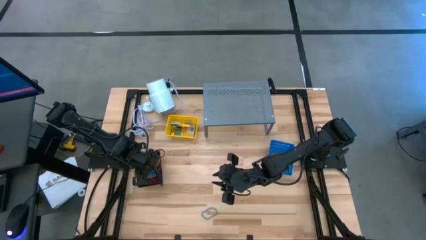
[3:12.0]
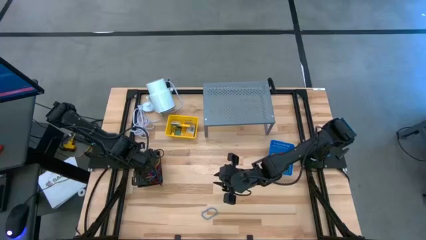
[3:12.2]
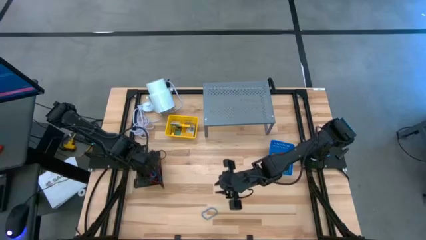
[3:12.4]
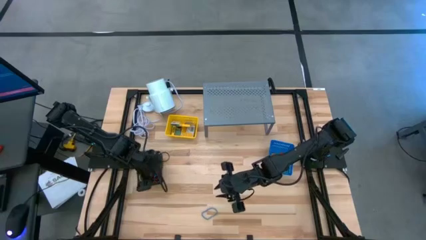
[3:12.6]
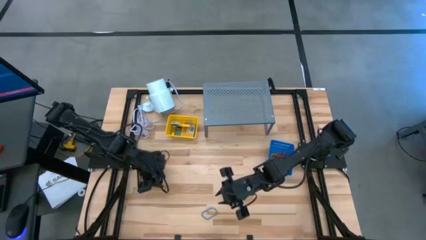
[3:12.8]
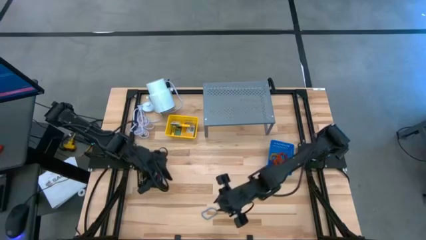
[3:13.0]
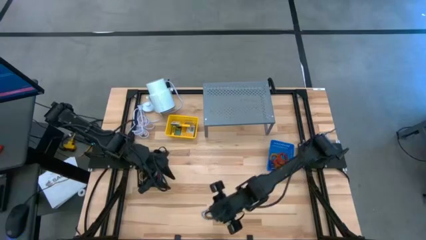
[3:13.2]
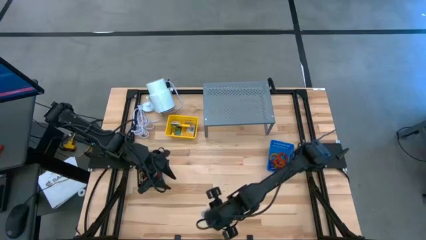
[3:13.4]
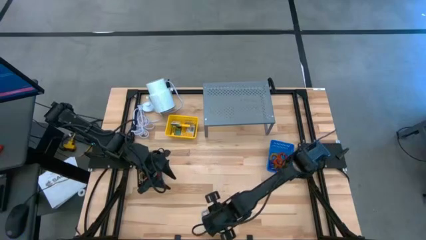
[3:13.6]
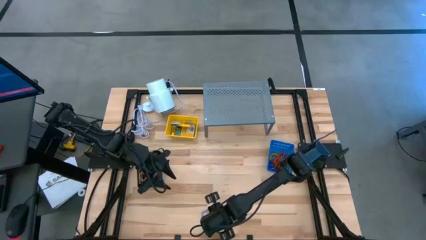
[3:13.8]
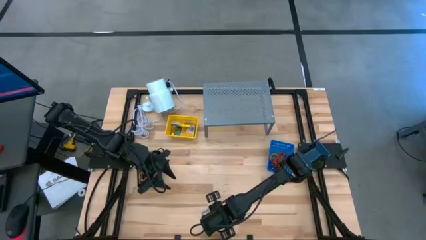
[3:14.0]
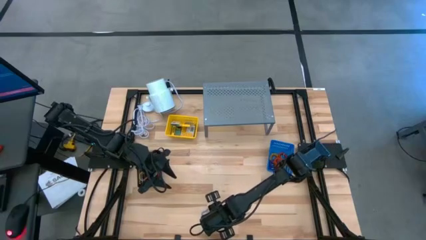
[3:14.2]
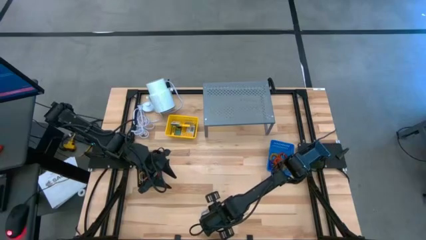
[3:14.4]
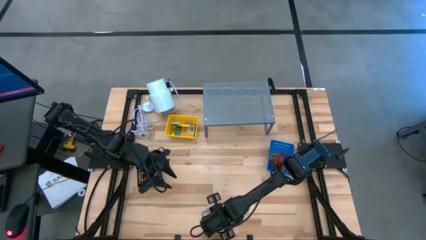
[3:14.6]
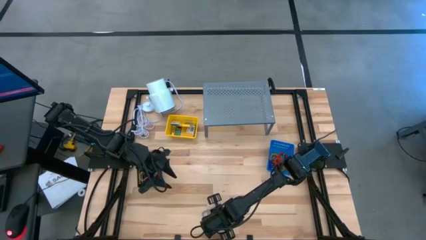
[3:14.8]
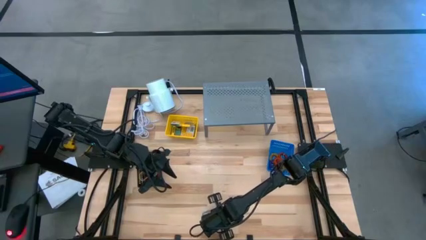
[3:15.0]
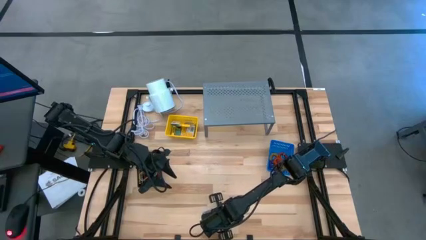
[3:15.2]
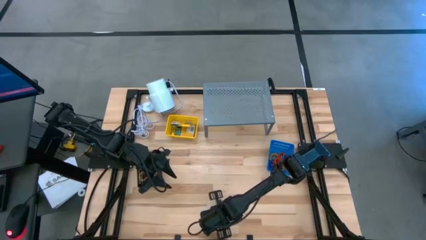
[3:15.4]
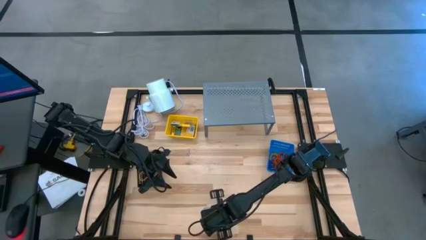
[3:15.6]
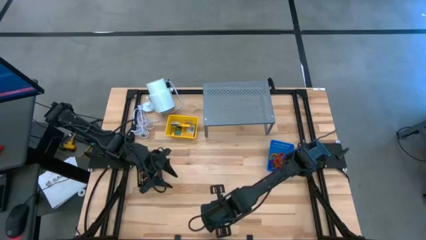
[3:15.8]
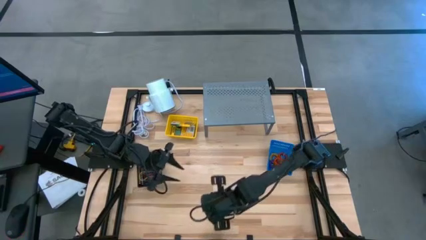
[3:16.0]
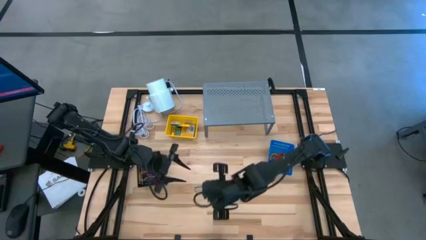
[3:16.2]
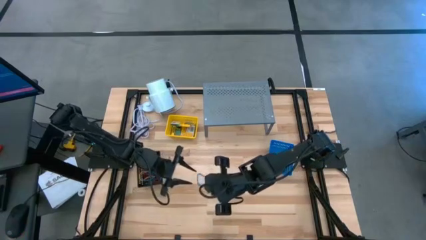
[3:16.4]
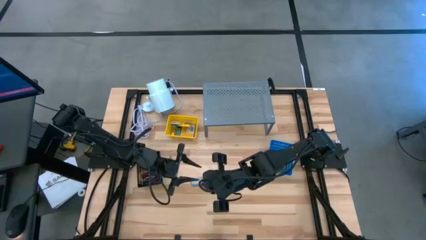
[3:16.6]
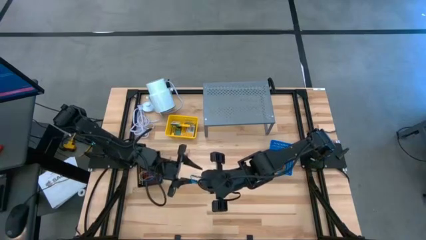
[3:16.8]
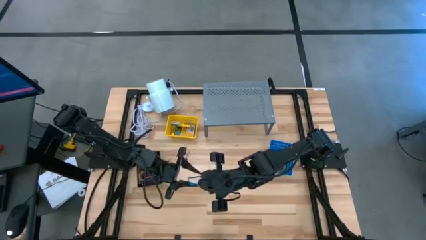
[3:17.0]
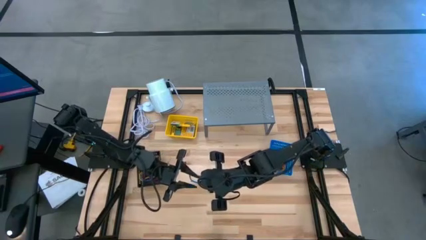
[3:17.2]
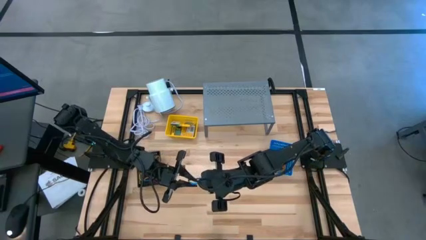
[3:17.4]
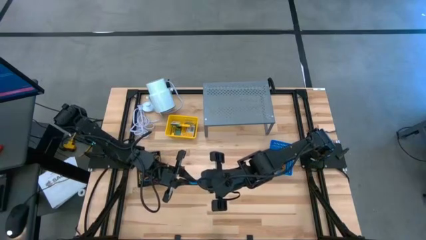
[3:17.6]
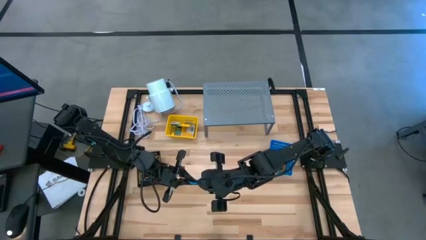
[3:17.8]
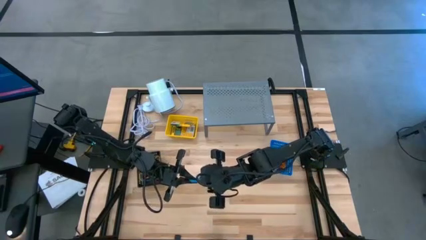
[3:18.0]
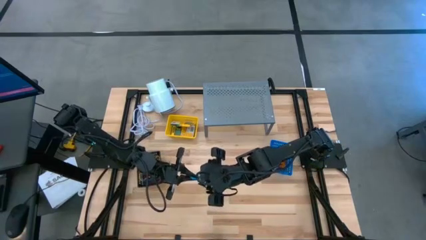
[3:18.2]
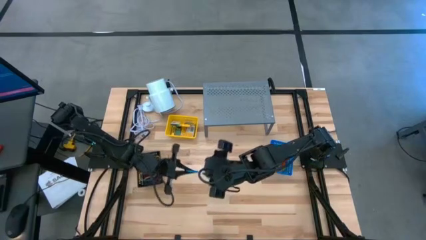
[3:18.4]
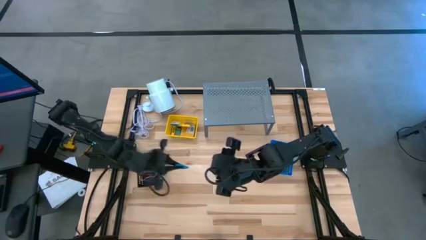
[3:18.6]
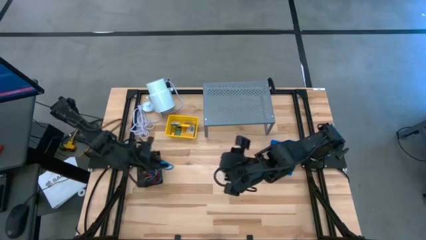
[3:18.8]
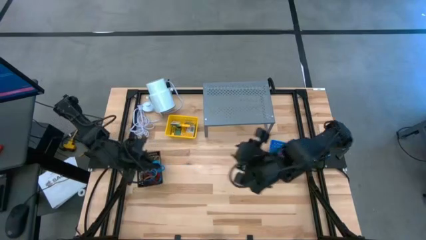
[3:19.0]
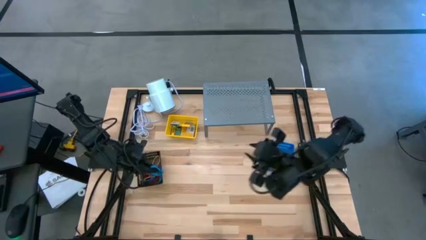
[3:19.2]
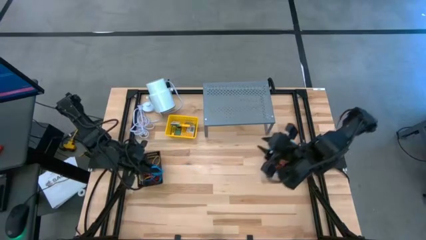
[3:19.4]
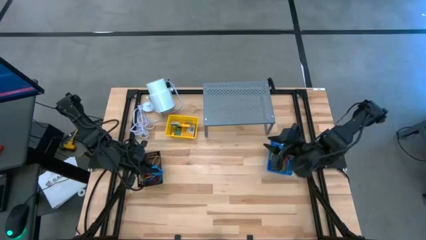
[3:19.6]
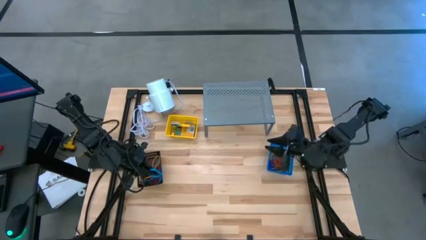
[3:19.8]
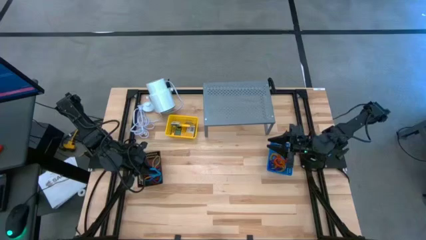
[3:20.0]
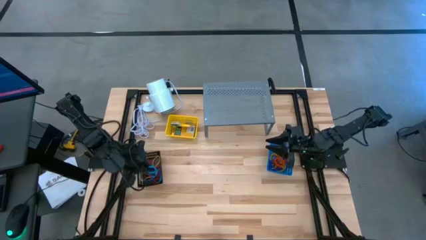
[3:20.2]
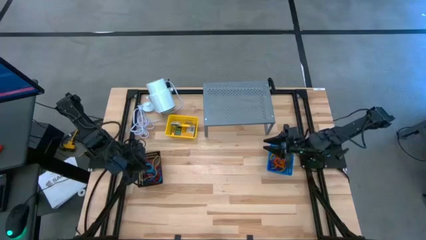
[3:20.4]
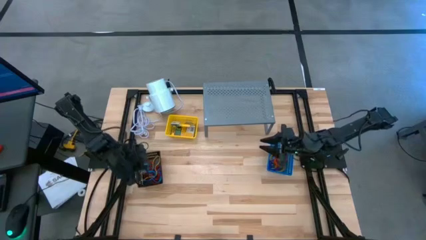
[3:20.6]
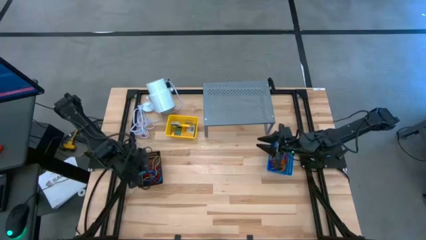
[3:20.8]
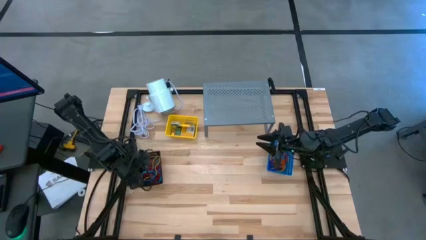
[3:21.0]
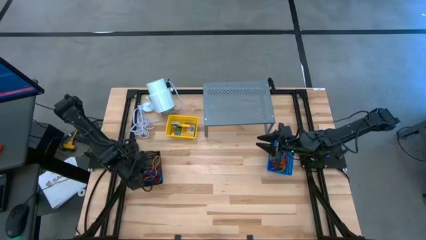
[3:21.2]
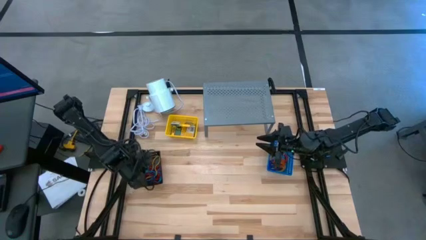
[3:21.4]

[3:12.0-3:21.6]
Task: Pick & Place Office Desk Supplies
Put the blue rubber band into the black bin

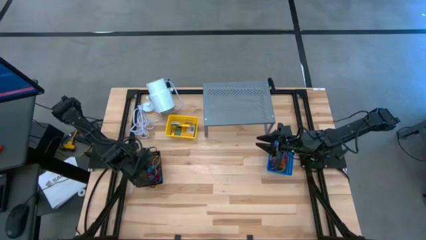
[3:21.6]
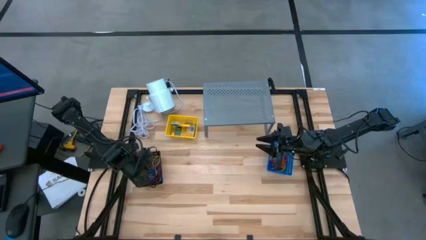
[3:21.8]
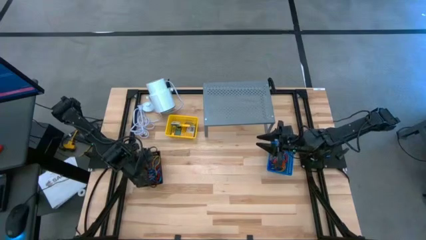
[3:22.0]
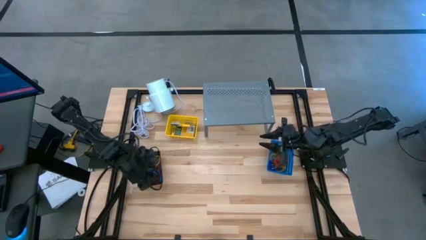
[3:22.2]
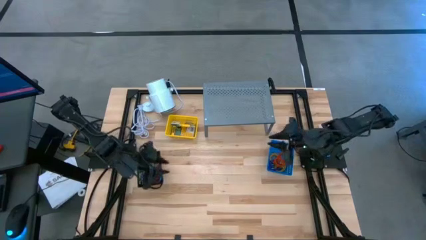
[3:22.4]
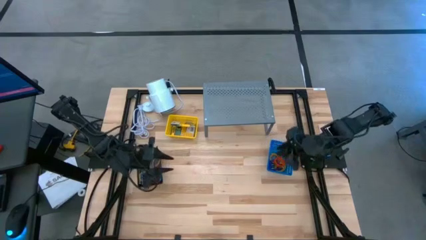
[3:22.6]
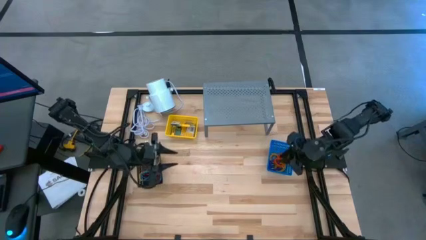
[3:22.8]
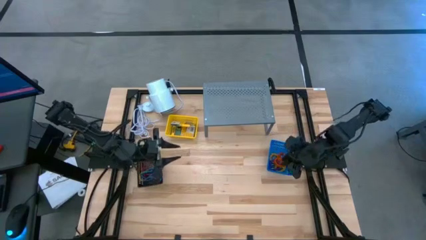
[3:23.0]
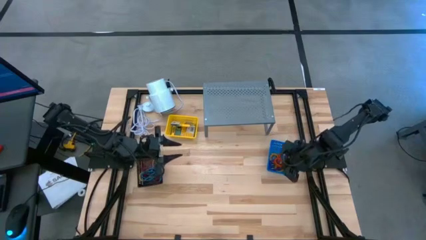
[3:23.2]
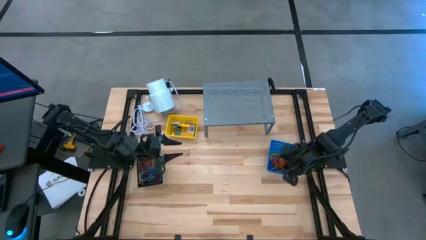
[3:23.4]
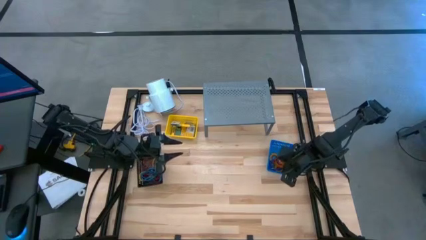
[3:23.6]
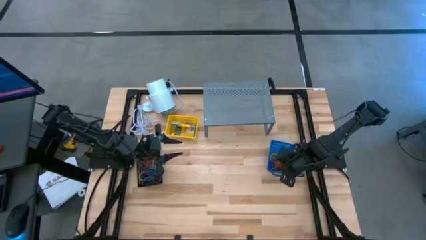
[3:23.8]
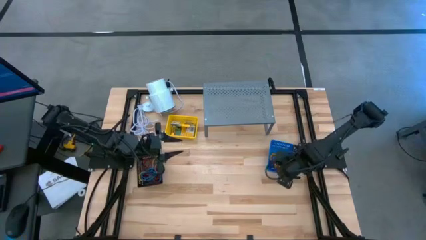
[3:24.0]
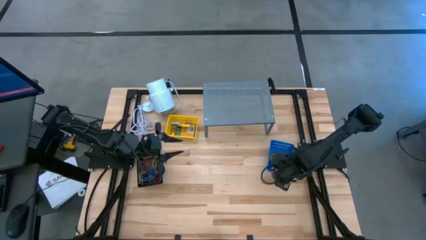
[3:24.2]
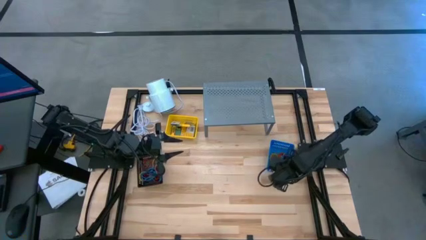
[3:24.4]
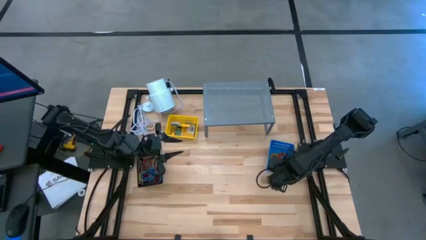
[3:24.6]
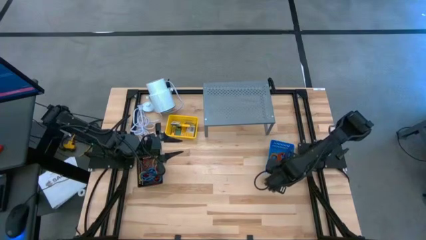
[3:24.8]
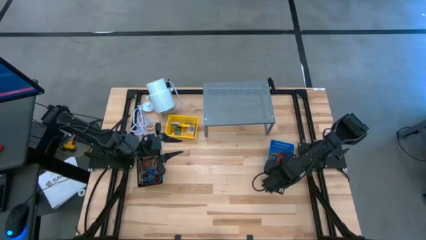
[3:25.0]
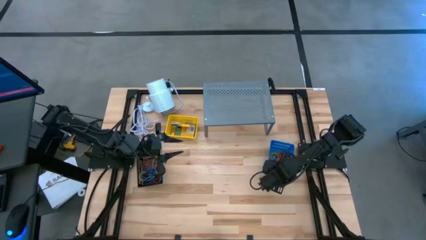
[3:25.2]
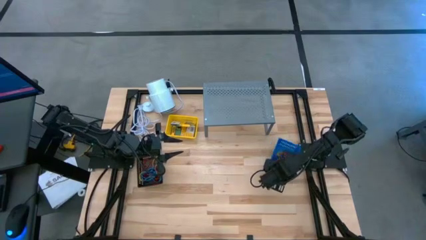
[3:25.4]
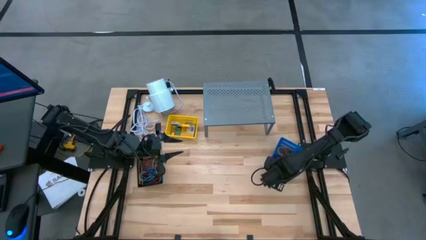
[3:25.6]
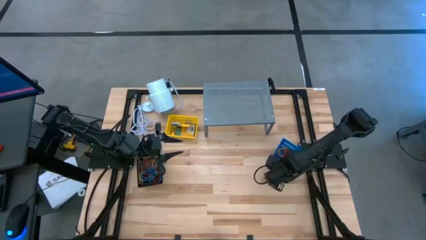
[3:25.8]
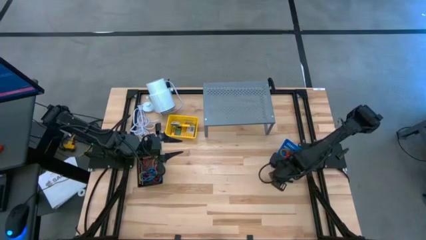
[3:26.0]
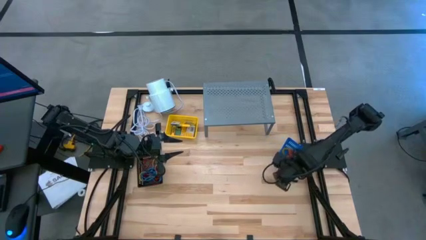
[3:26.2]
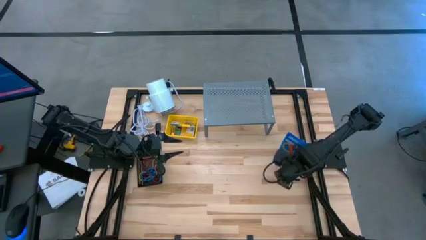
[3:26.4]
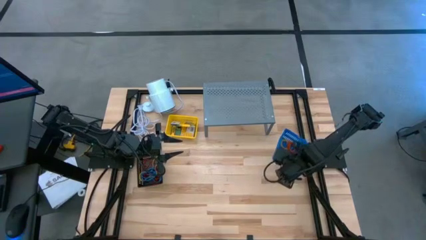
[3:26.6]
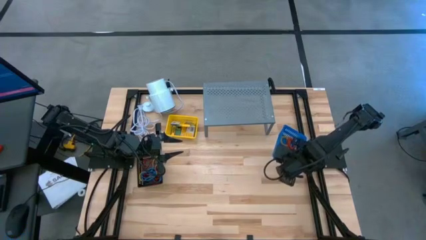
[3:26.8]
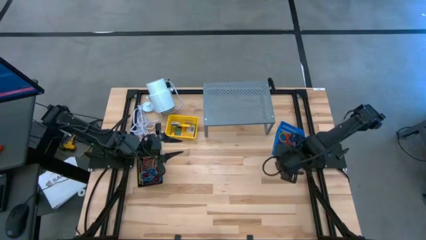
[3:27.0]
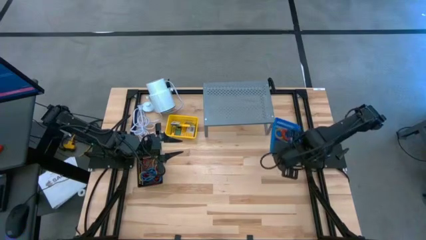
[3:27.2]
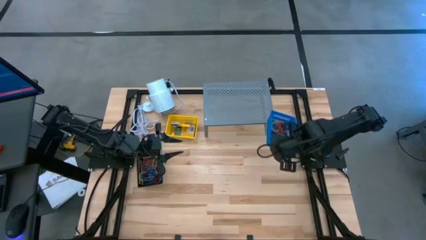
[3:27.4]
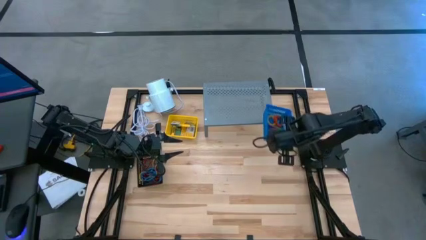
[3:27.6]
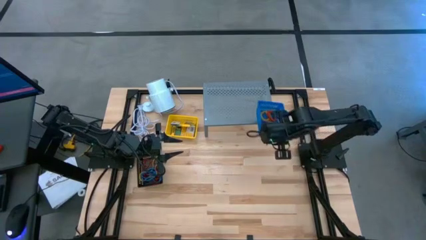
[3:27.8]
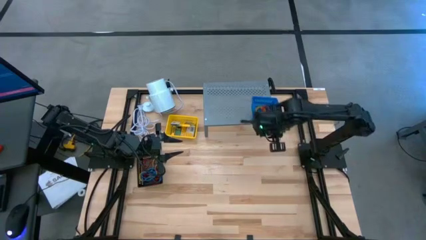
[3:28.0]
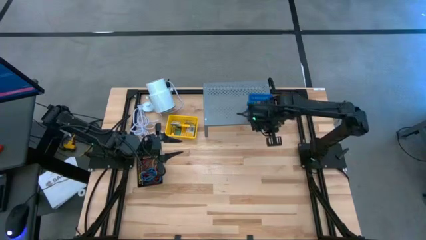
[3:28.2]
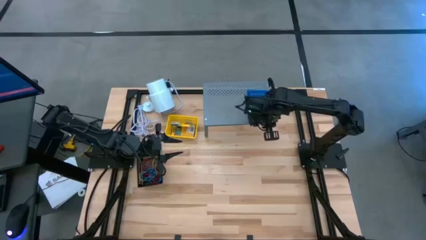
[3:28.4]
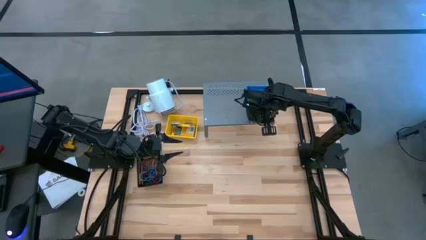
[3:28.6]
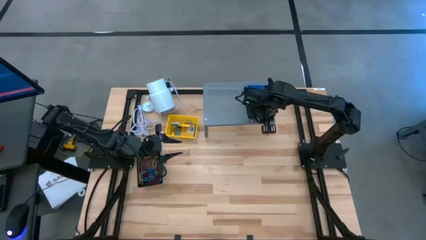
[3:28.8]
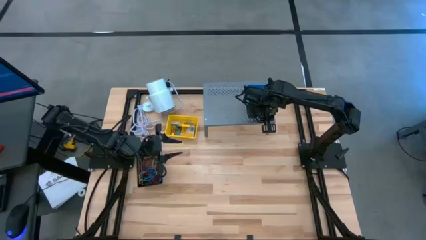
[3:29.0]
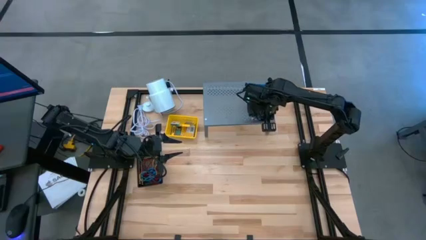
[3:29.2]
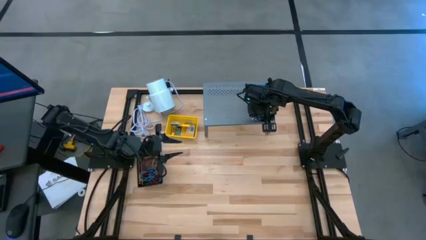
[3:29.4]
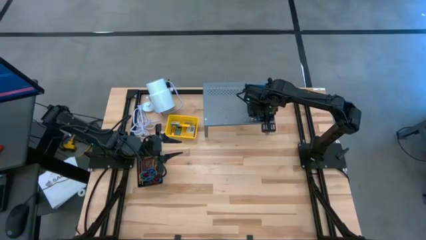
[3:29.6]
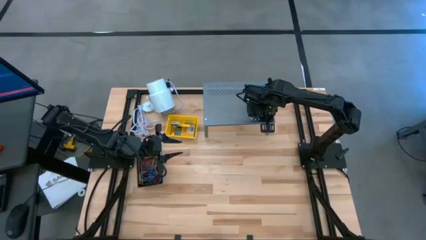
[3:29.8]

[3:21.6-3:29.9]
Put the blue bin on the shelf
